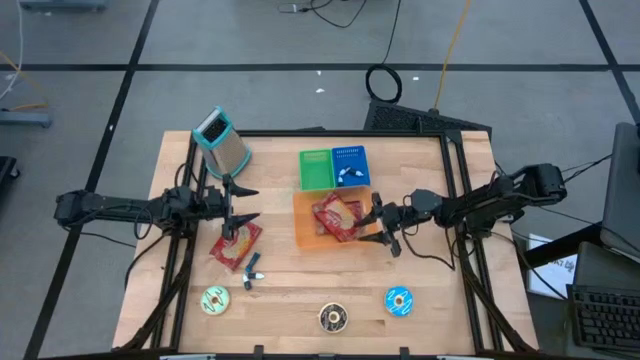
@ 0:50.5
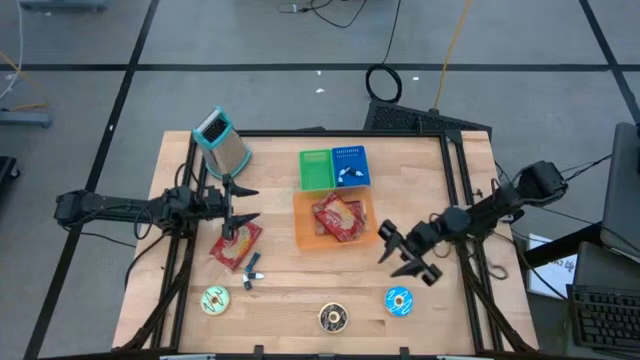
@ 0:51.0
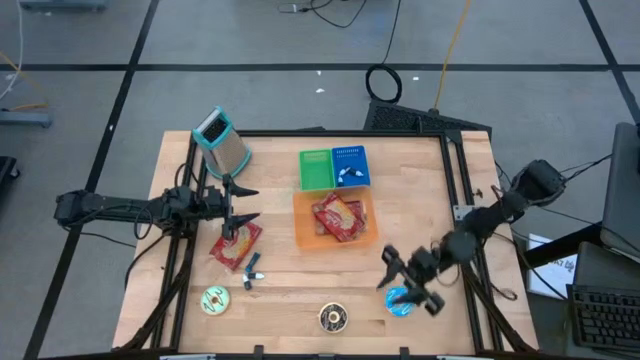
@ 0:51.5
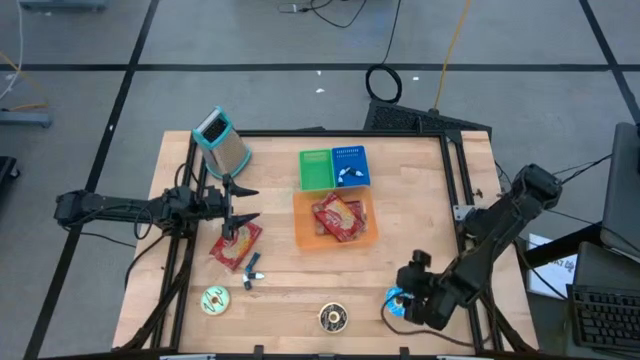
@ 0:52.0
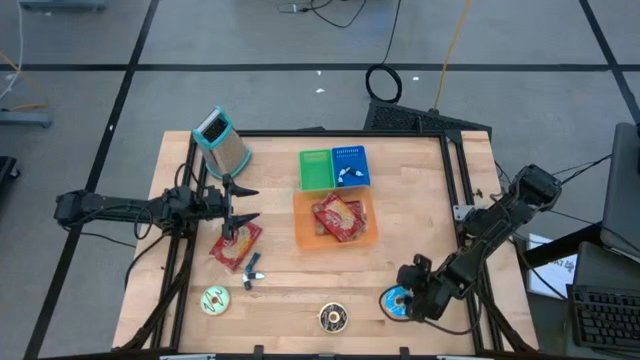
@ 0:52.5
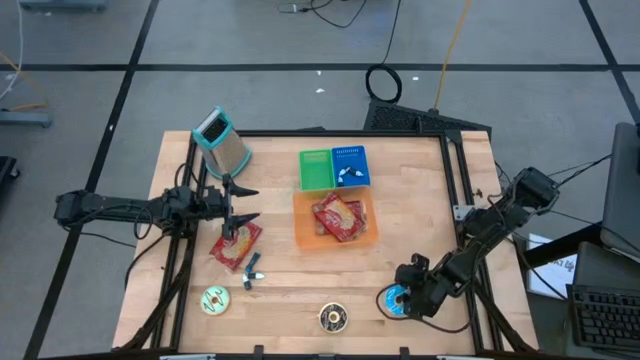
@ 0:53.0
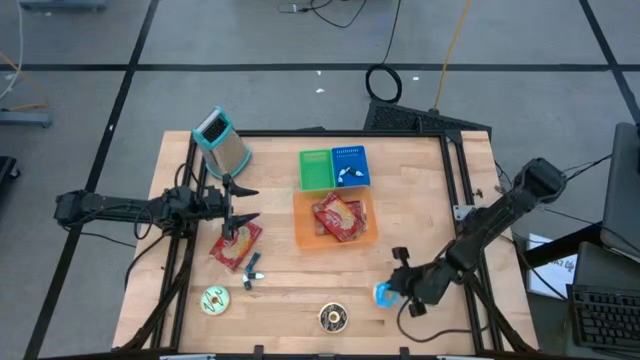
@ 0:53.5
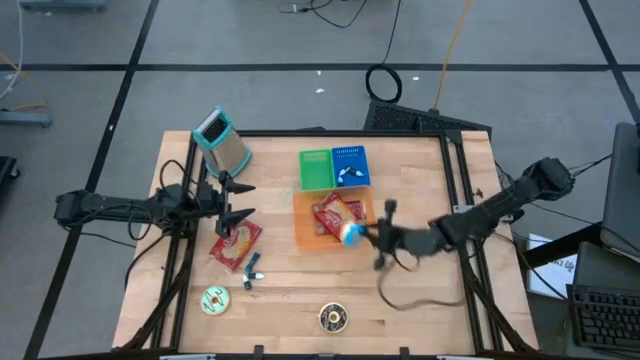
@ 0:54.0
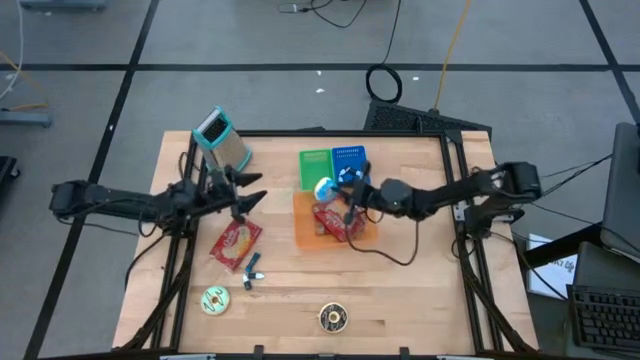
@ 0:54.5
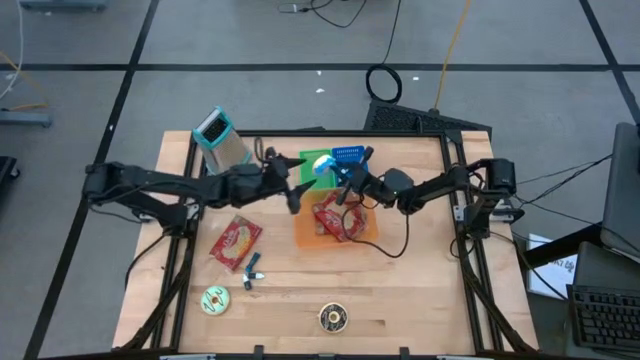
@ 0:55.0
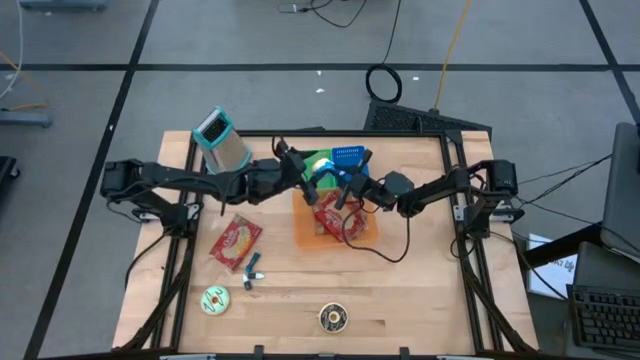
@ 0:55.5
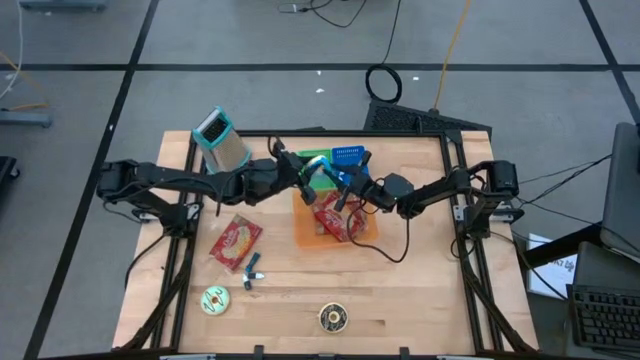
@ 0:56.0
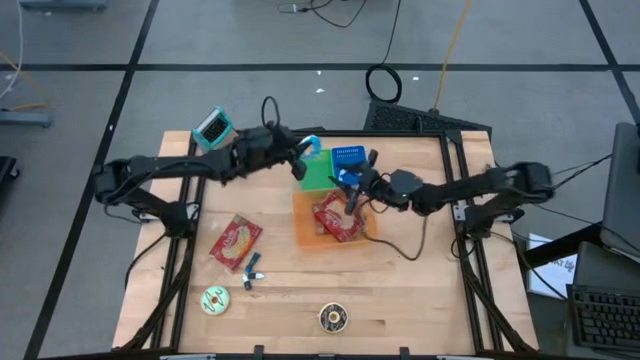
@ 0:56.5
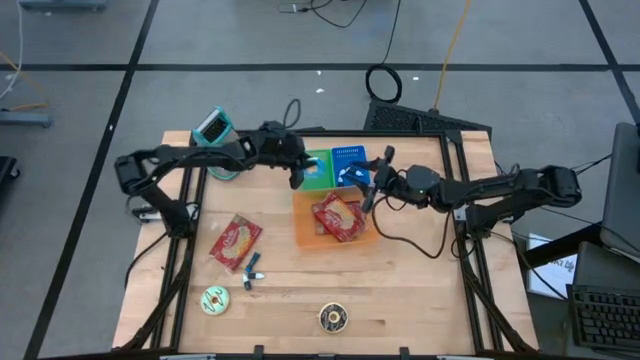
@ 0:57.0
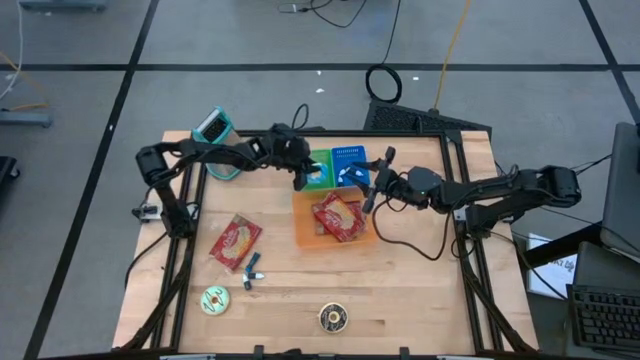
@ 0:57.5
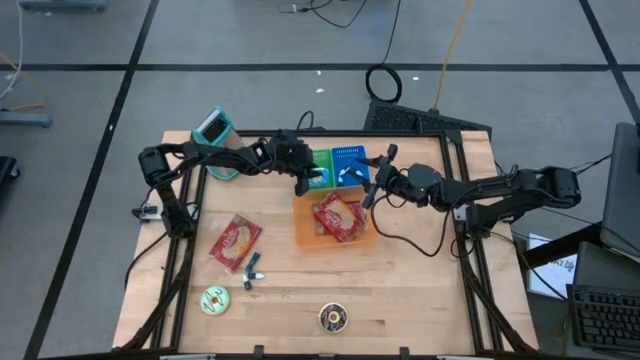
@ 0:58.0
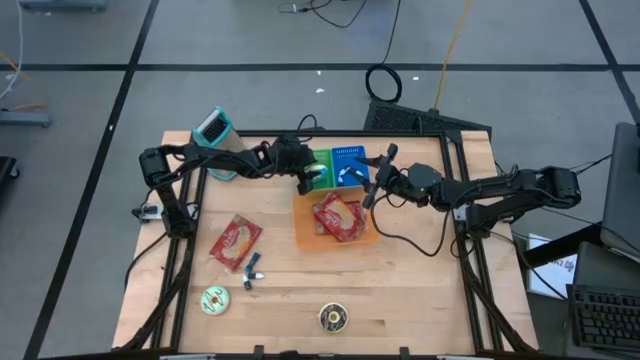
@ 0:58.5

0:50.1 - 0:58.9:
Put the blue doughnut into the green bin

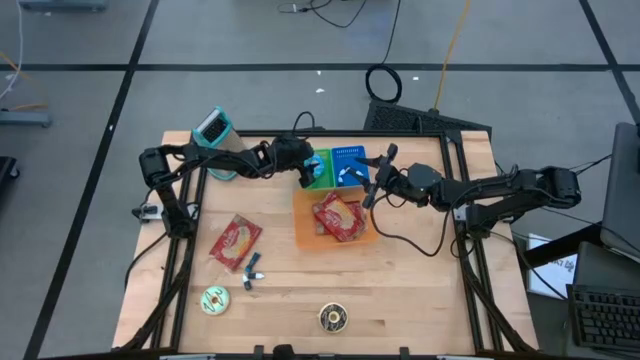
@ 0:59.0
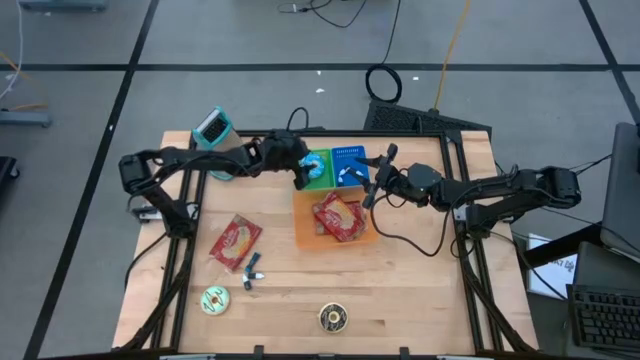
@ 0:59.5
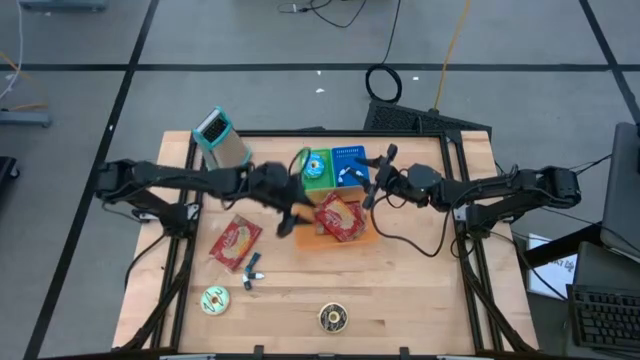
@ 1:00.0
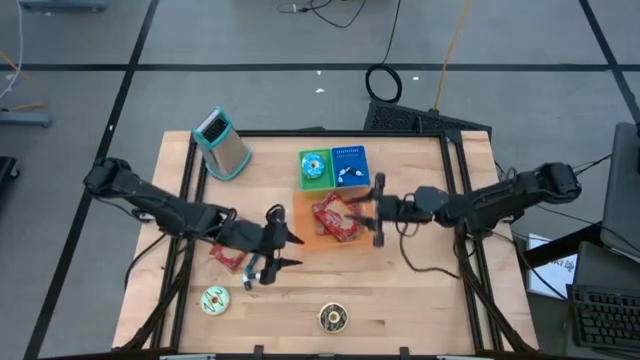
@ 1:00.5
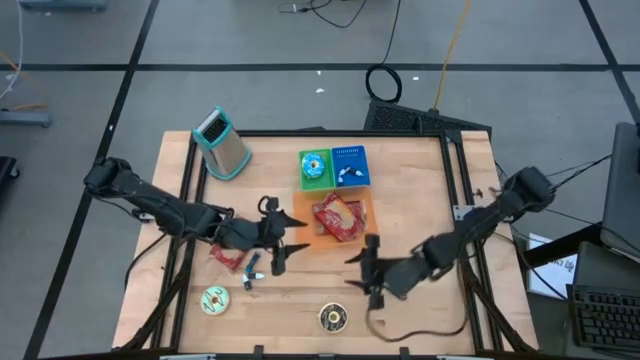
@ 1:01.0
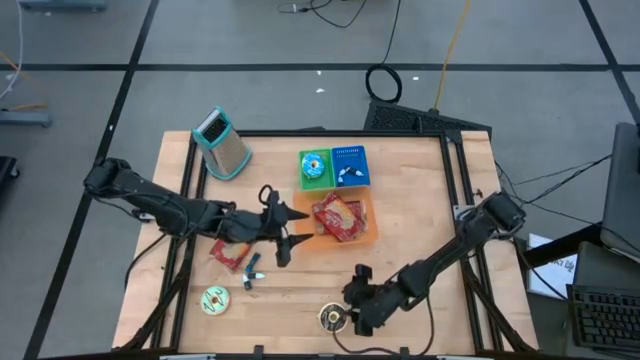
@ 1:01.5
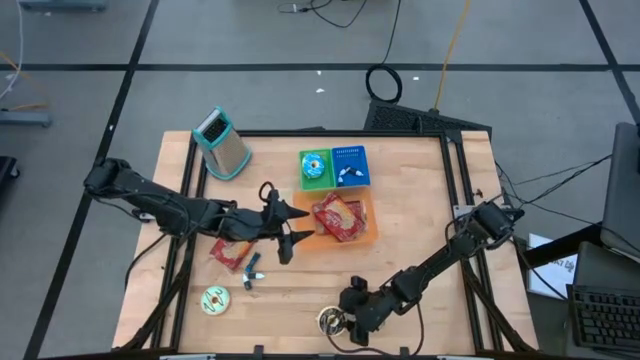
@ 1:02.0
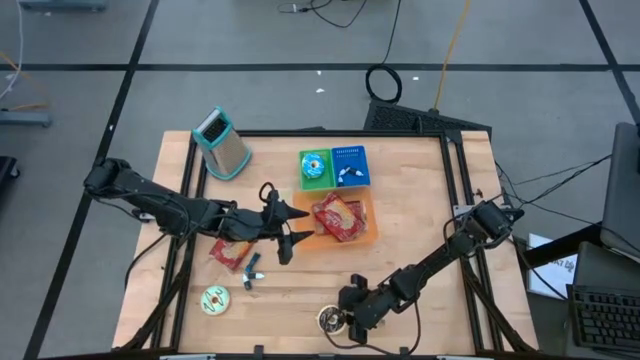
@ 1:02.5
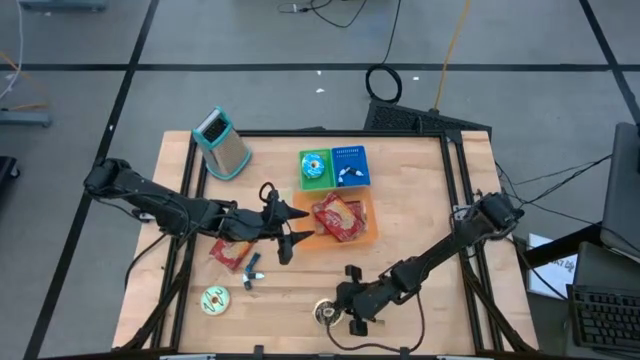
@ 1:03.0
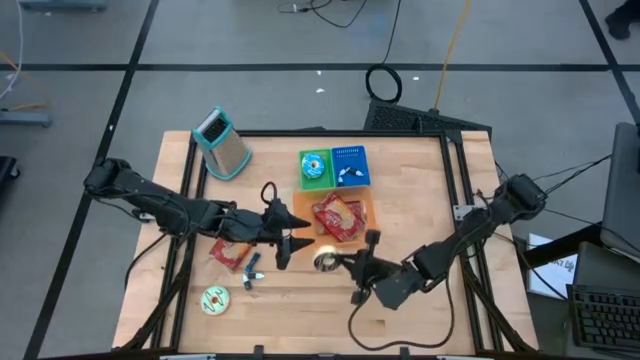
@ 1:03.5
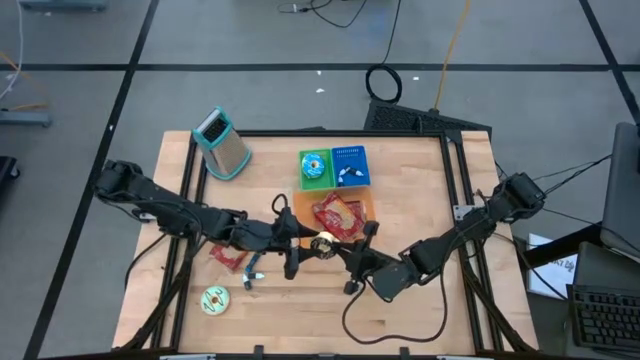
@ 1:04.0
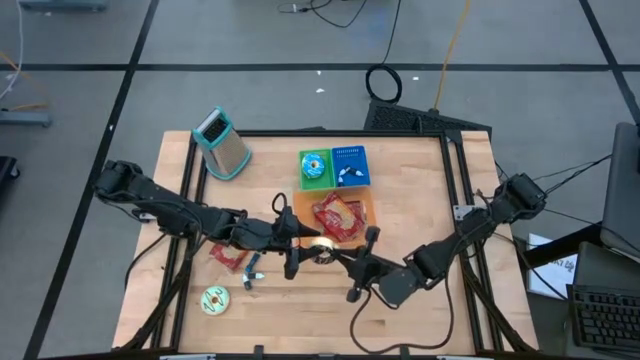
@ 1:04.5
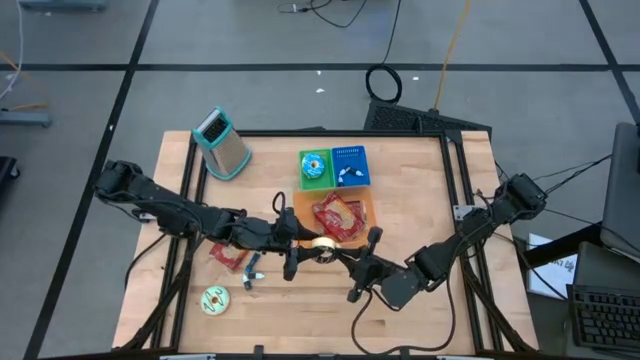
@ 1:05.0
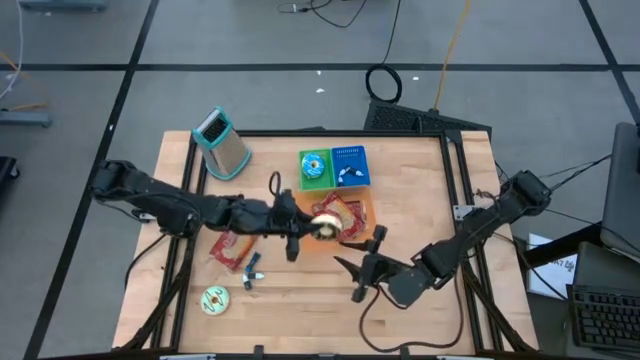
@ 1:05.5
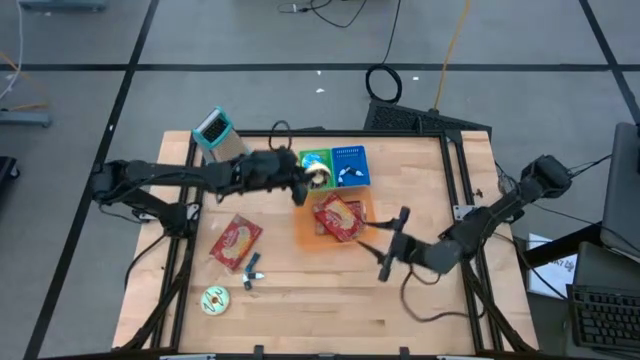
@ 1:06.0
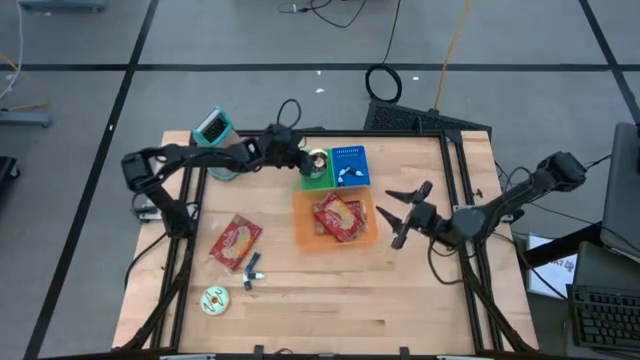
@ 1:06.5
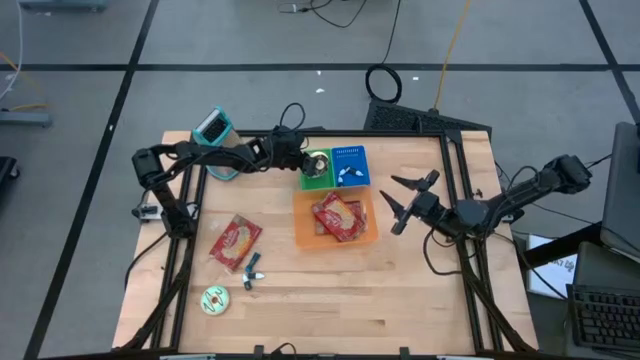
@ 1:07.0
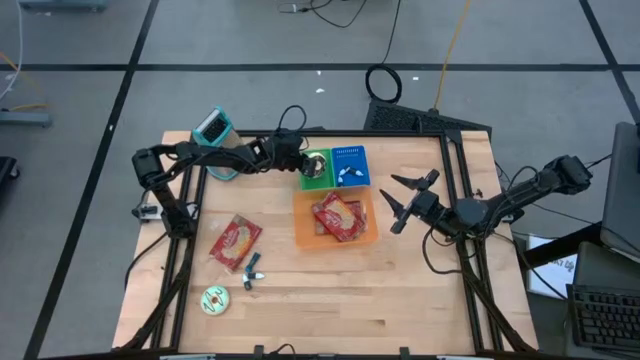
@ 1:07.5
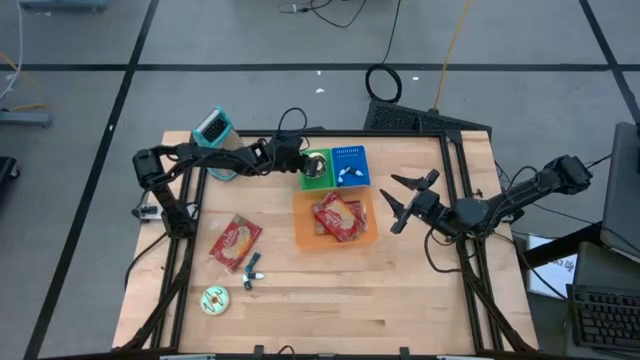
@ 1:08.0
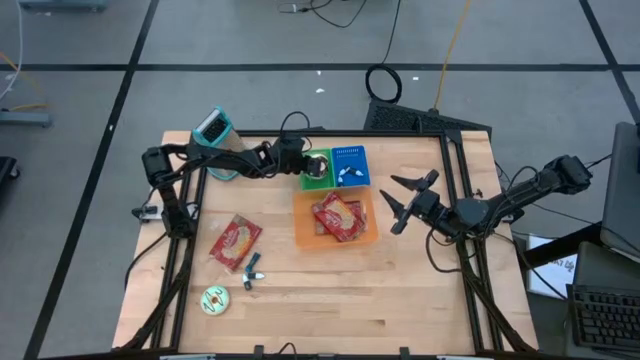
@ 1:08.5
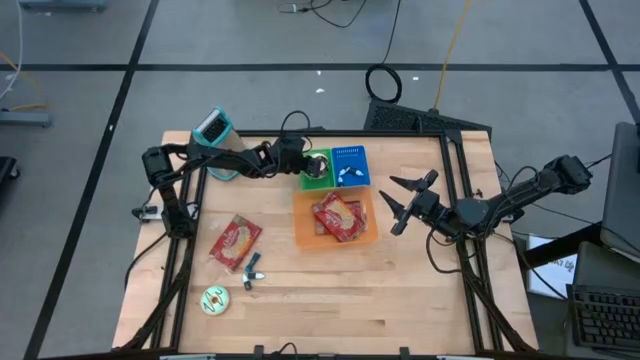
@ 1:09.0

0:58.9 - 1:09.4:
Put the black doughnut into the green bin
